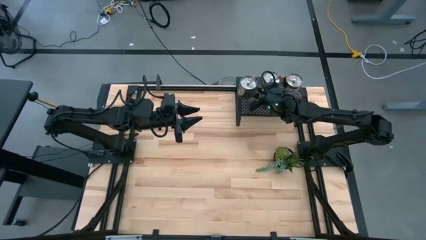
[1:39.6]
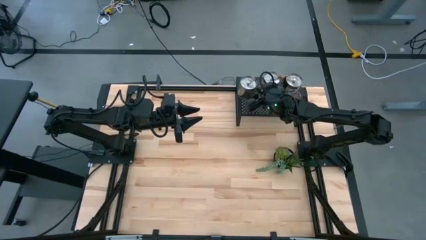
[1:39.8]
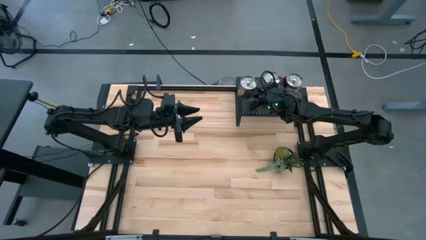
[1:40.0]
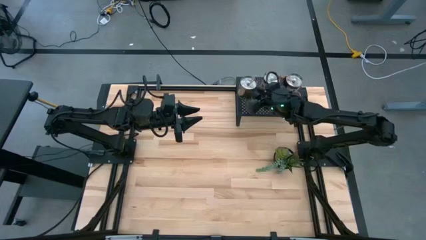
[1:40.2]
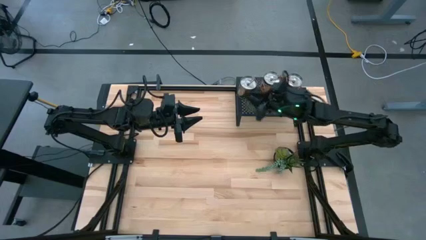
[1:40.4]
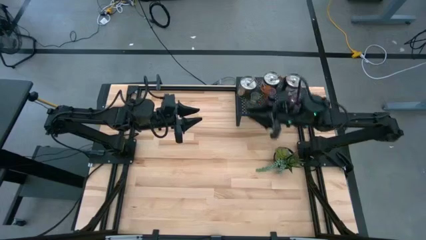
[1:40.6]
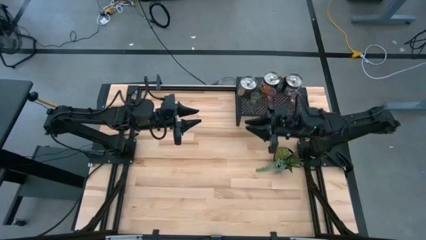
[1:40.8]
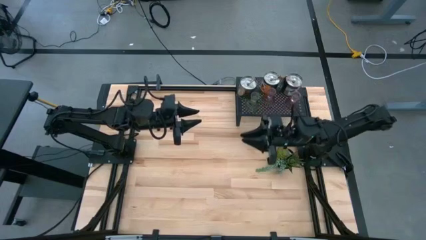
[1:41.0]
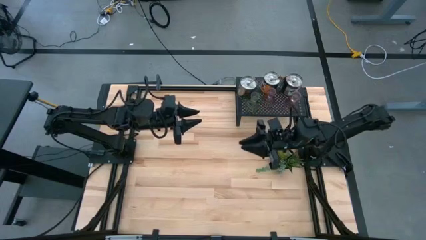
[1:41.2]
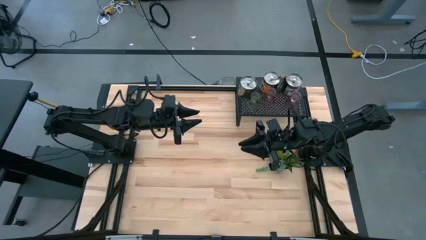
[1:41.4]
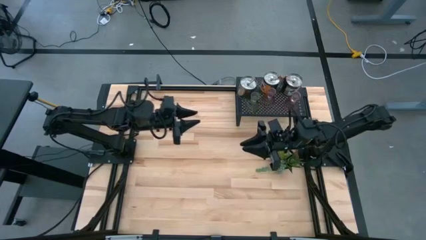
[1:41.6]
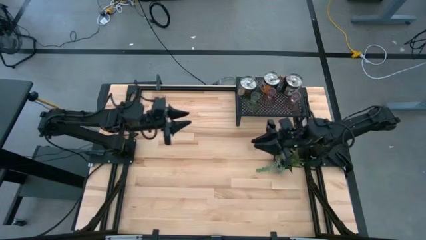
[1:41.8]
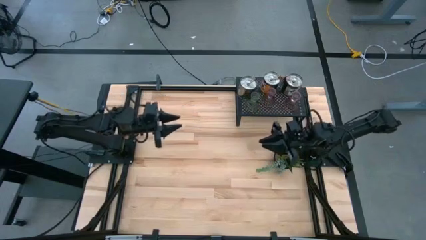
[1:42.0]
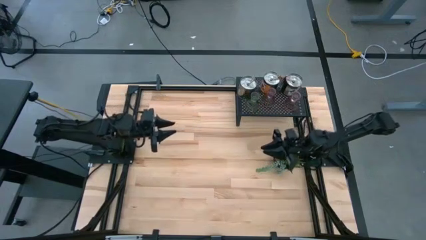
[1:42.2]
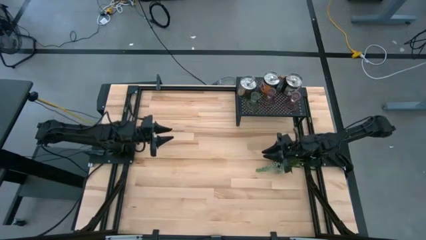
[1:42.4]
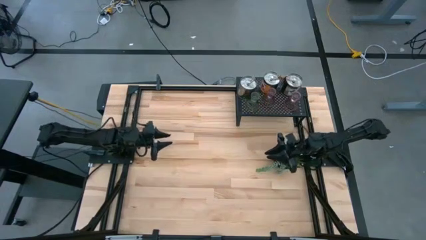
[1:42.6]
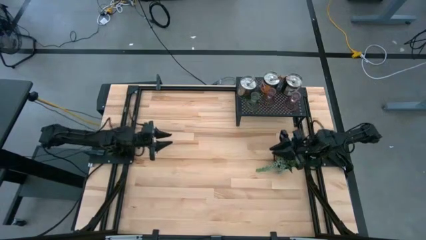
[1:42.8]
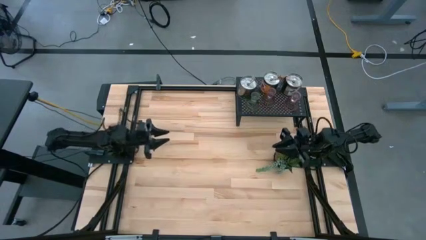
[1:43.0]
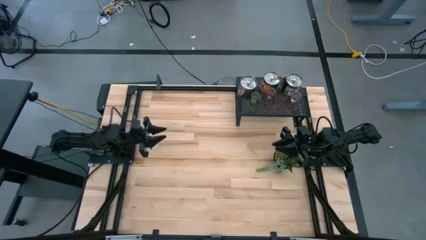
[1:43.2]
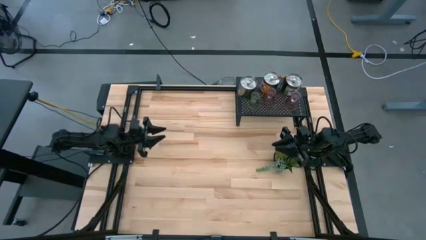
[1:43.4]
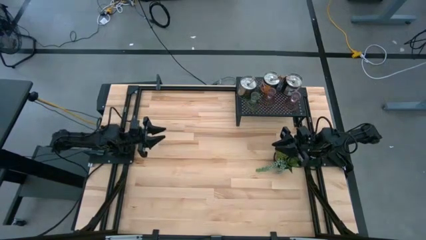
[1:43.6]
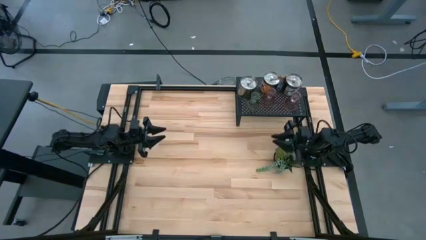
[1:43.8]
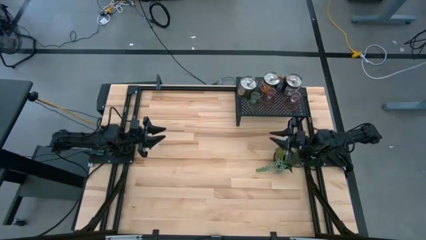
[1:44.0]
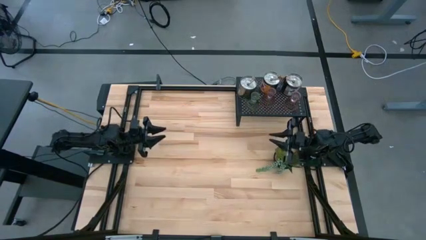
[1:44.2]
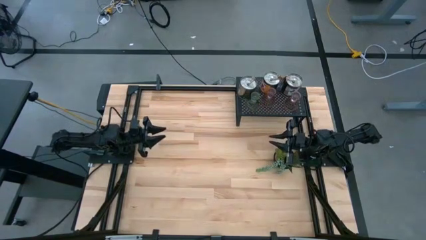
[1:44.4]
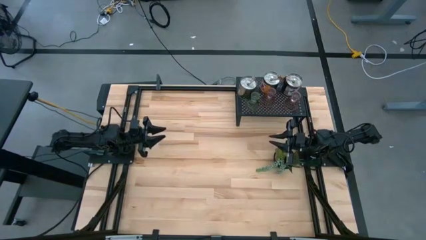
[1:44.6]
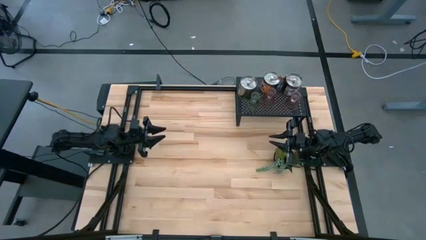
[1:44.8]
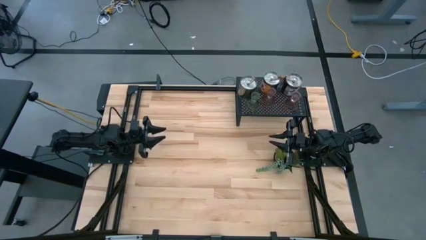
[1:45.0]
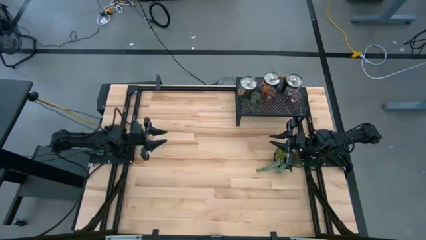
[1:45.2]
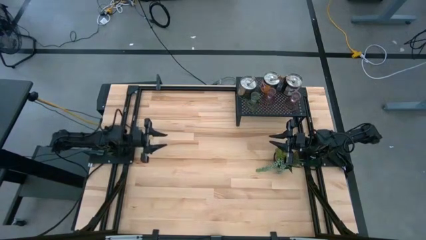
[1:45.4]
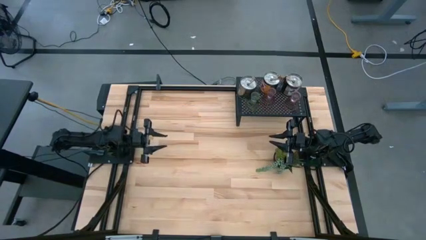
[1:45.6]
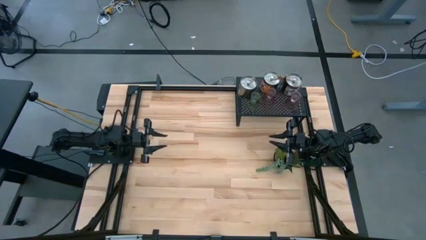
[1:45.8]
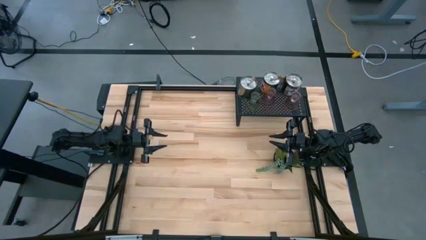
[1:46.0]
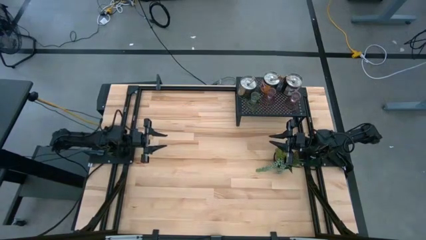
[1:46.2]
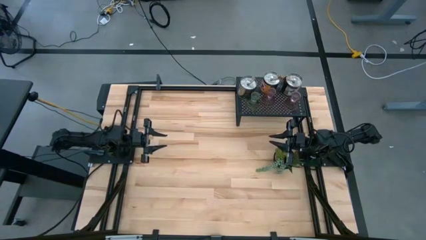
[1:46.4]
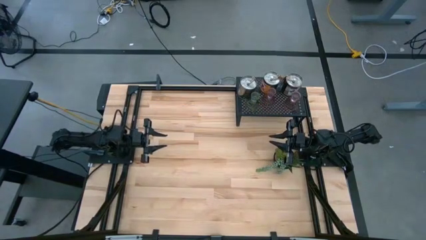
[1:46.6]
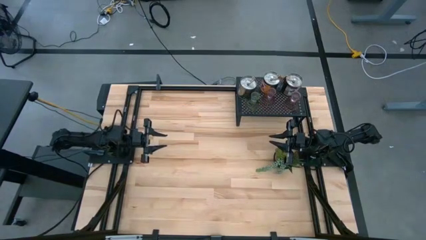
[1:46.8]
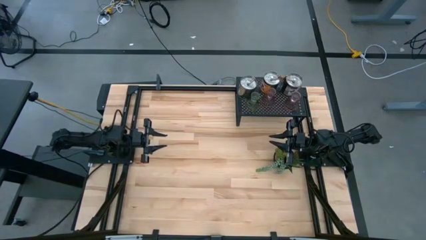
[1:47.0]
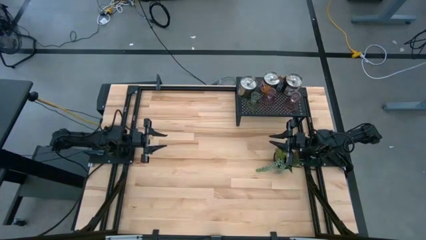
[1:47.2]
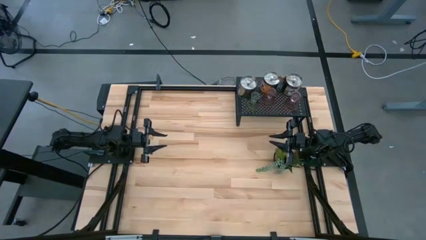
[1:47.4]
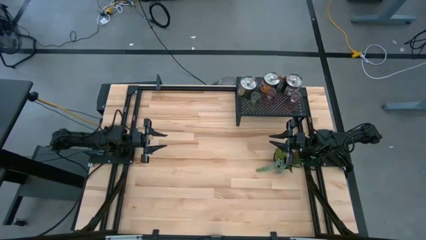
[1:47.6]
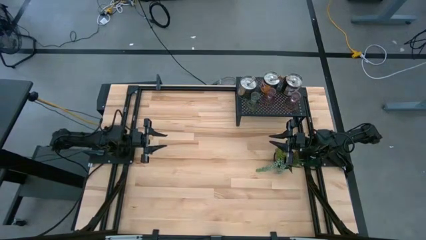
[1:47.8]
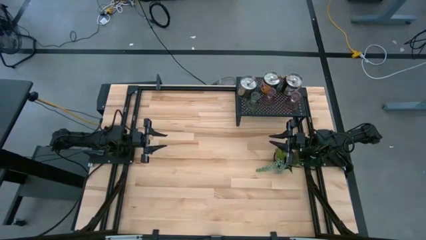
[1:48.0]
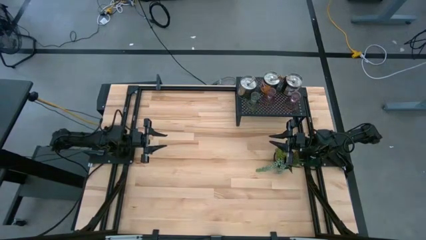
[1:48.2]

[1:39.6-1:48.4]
Task: Pick & Place candle stick holders
Return to Home Position

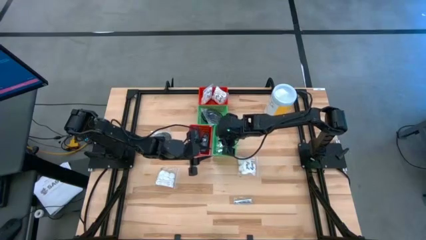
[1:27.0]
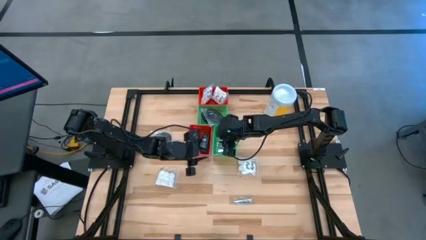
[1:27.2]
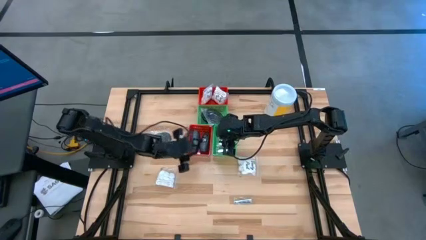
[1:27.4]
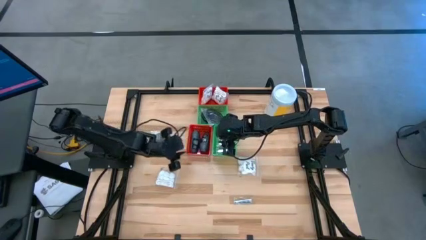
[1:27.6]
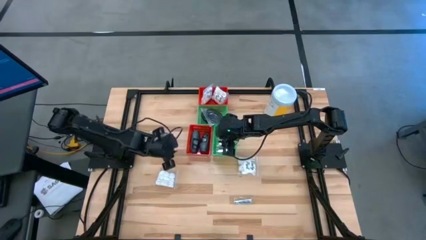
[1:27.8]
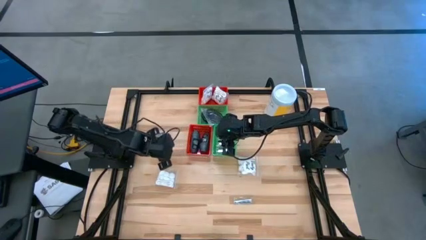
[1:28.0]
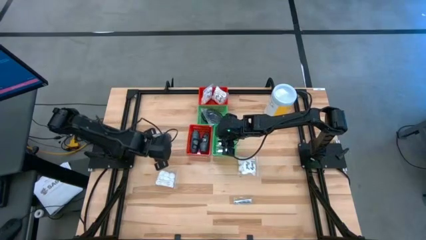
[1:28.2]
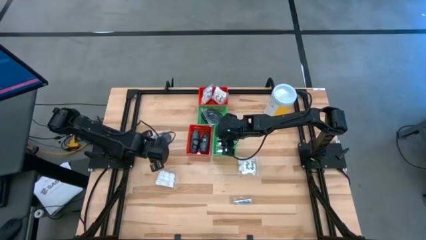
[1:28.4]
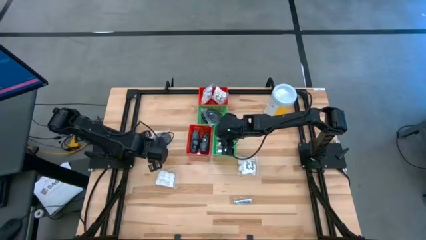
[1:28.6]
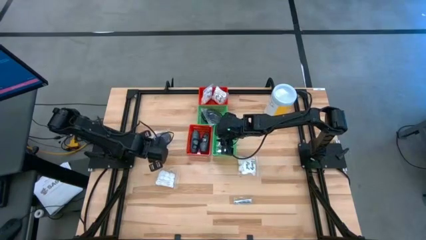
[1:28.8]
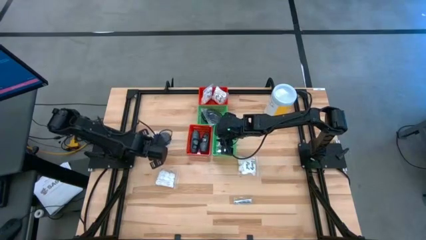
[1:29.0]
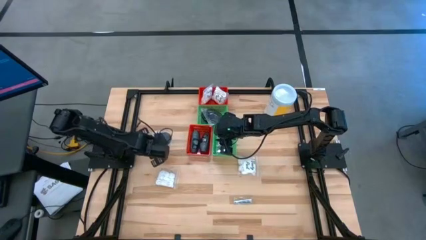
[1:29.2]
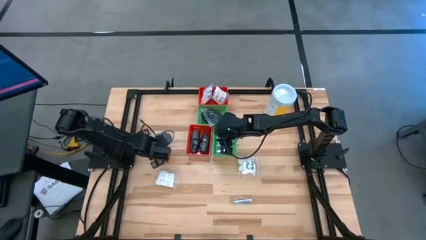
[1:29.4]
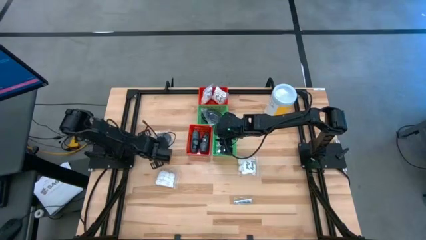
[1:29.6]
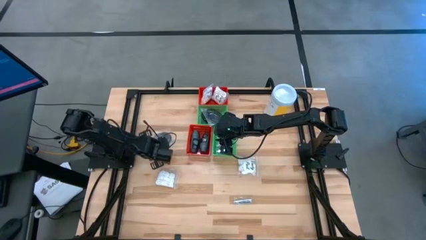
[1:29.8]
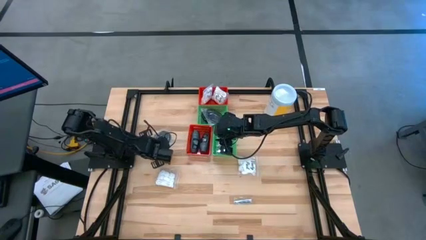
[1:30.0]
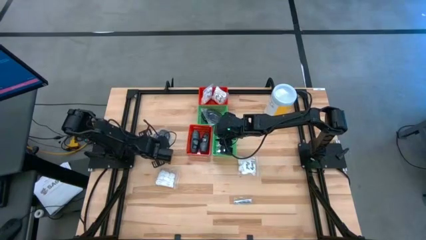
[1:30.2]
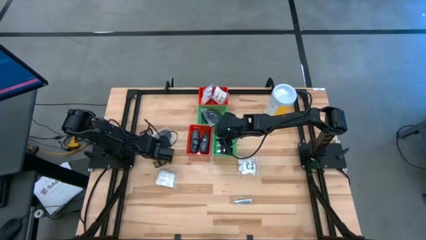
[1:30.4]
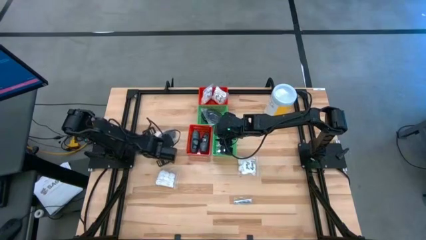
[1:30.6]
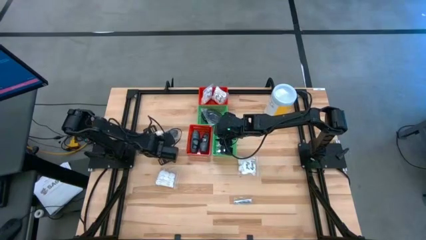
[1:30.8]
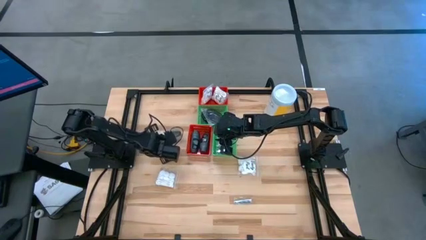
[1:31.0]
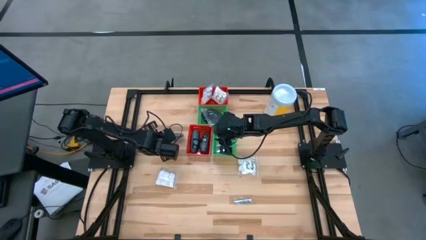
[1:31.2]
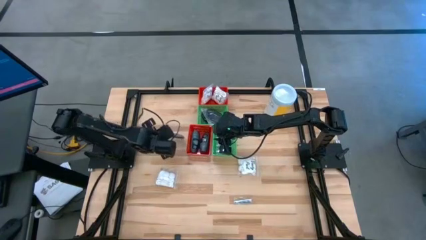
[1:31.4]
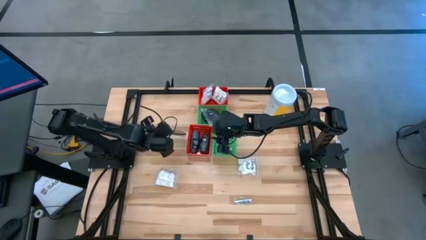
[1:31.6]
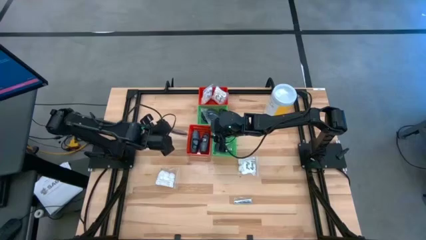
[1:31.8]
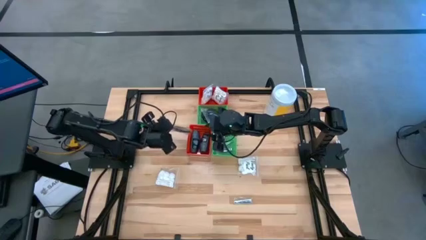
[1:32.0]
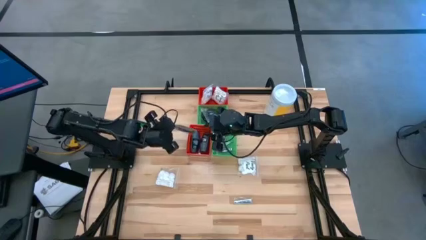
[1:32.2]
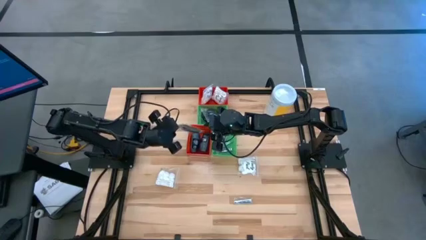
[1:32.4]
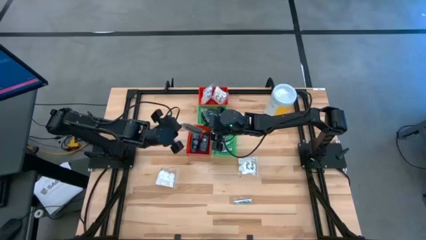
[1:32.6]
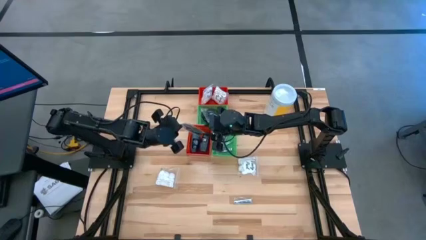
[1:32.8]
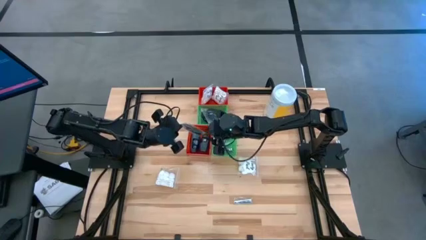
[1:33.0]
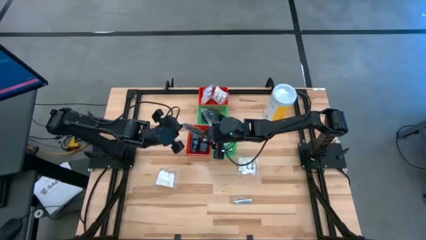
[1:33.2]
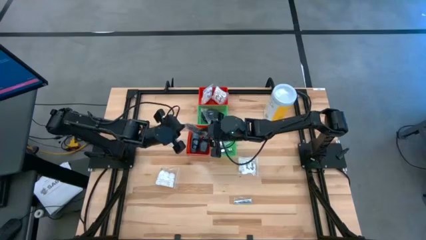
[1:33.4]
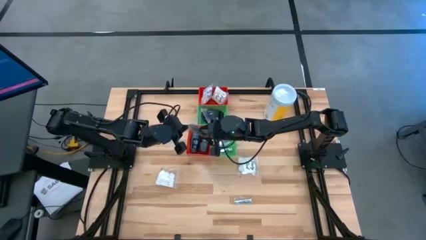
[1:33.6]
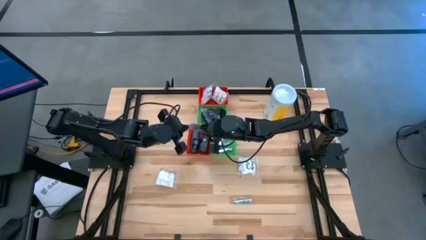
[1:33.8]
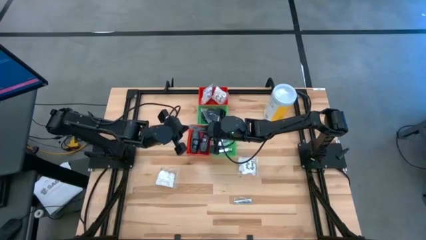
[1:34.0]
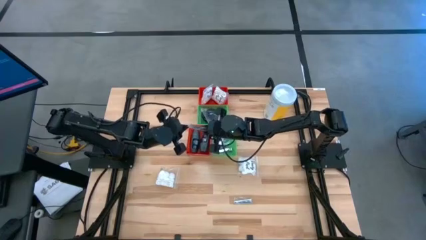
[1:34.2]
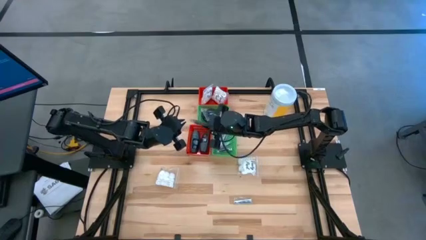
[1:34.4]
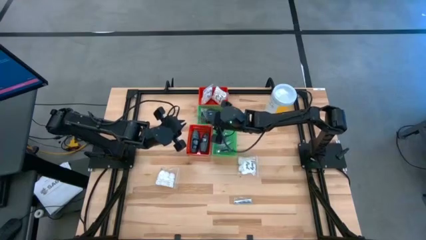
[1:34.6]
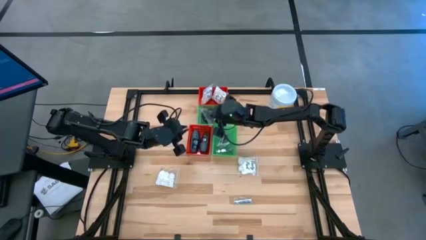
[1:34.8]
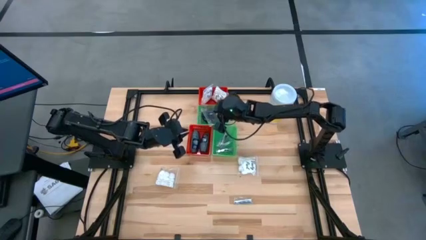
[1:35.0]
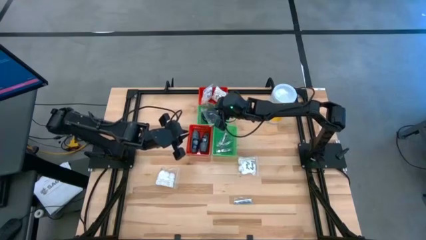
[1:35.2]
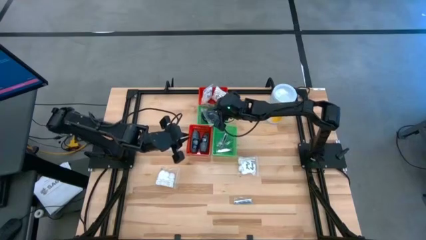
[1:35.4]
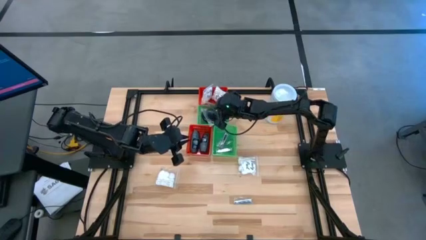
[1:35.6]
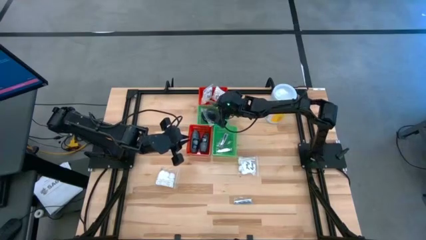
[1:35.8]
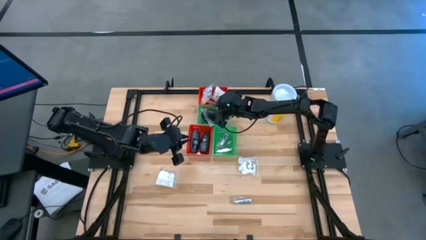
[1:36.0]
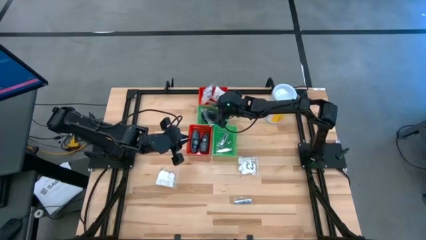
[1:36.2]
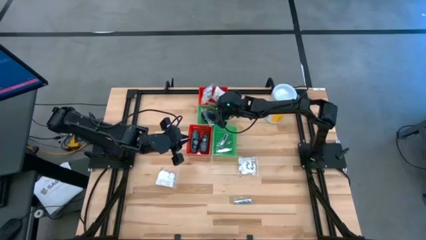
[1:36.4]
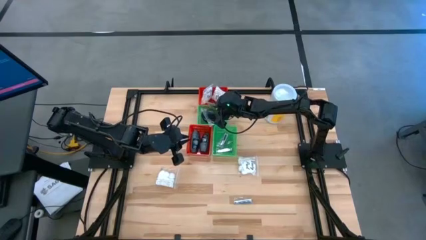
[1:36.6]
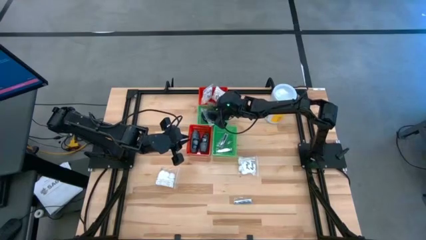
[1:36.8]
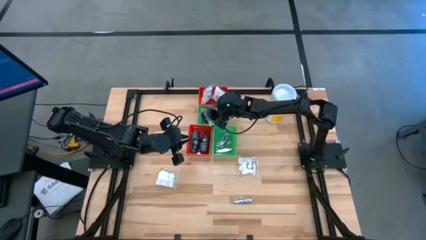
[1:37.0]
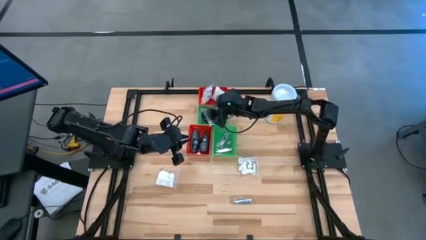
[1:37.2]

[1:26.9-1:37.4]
Task: Pick & Place Travel size toiletries
Put the black hairbrush into the top green bin
